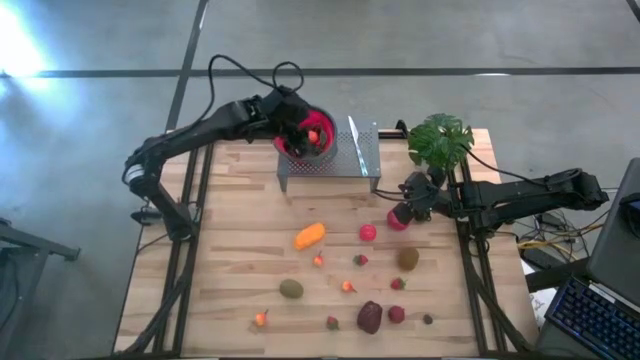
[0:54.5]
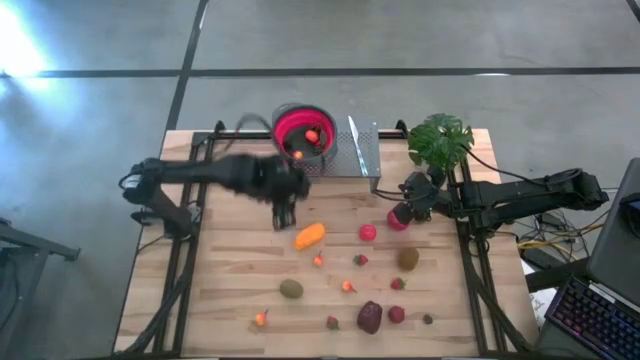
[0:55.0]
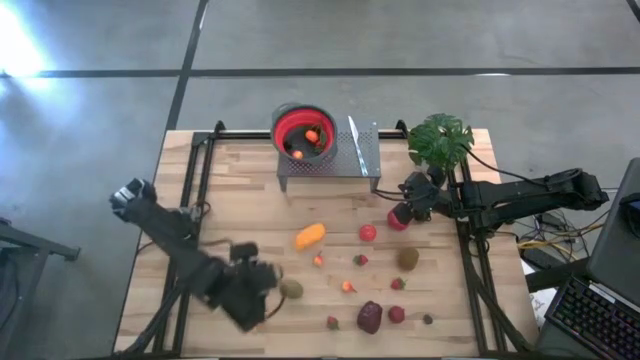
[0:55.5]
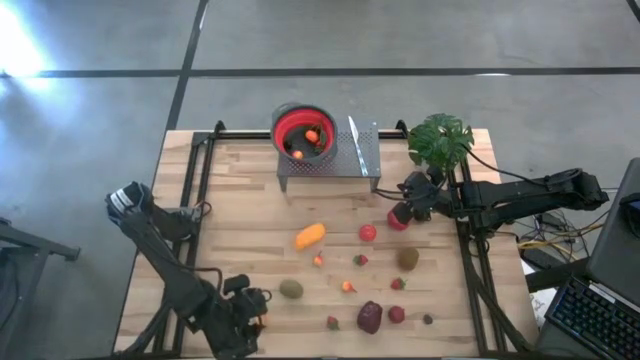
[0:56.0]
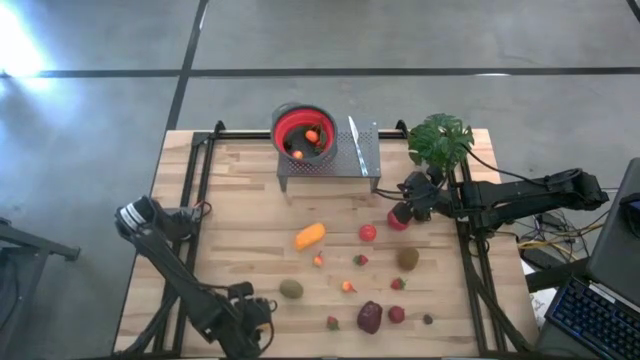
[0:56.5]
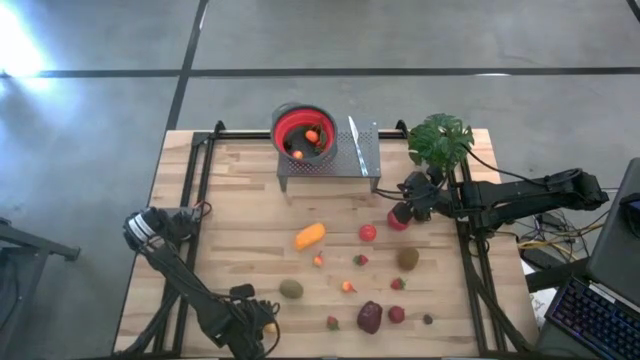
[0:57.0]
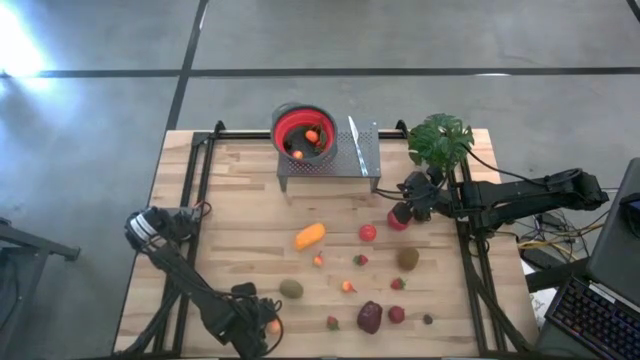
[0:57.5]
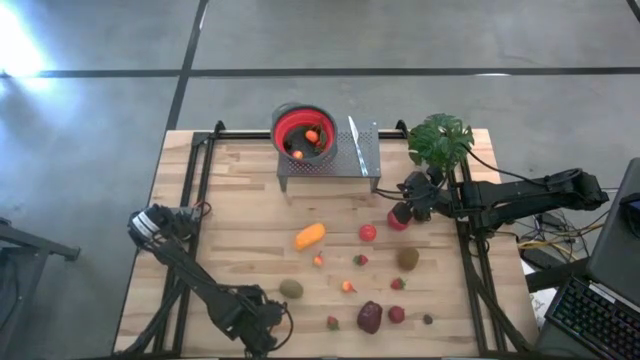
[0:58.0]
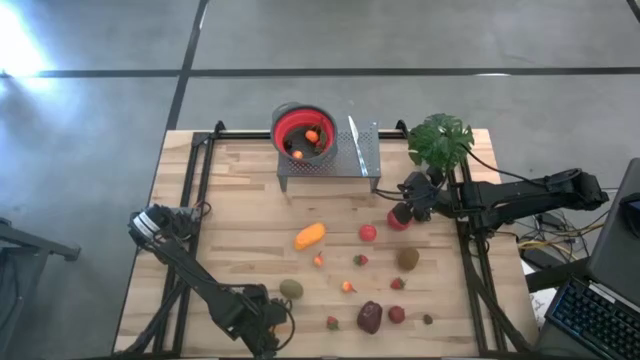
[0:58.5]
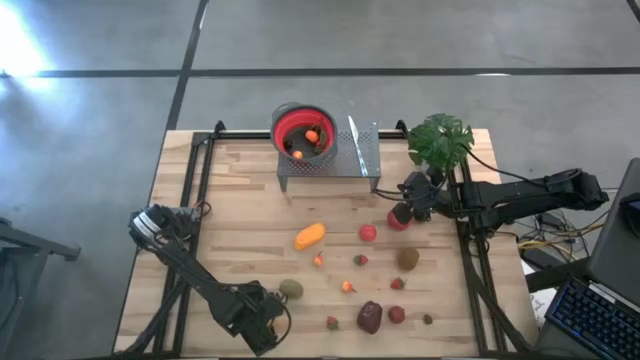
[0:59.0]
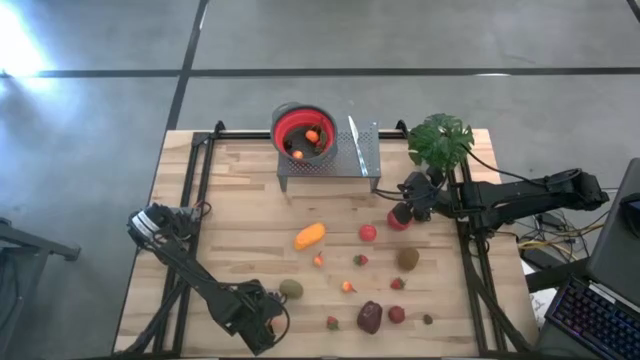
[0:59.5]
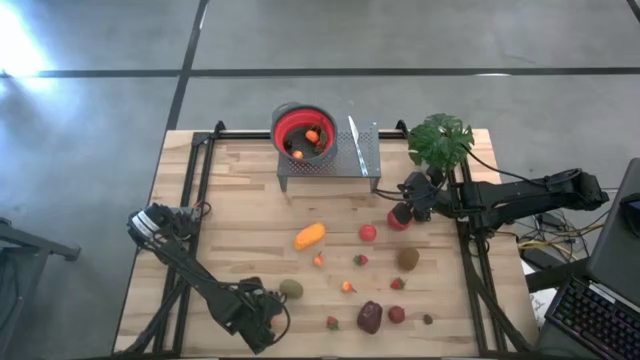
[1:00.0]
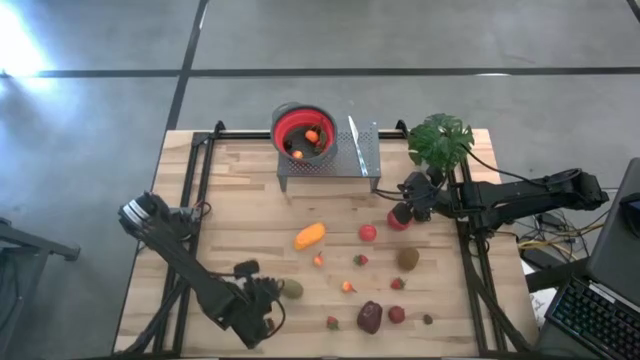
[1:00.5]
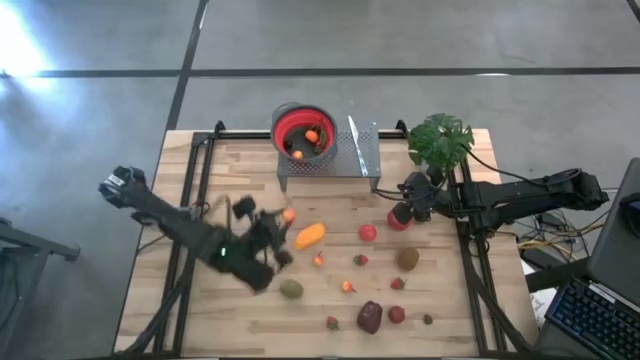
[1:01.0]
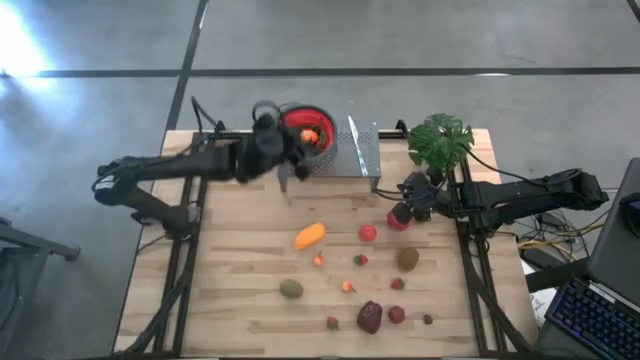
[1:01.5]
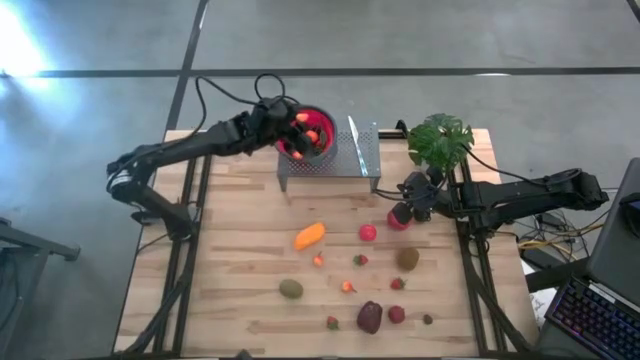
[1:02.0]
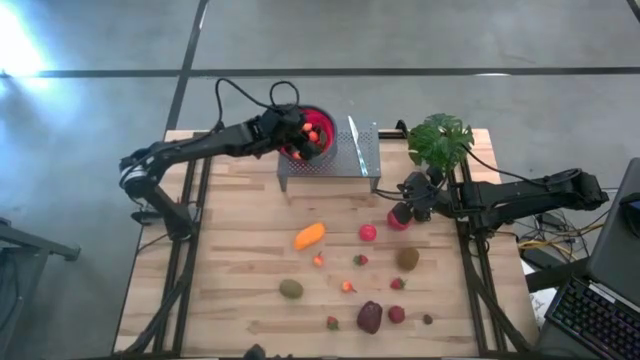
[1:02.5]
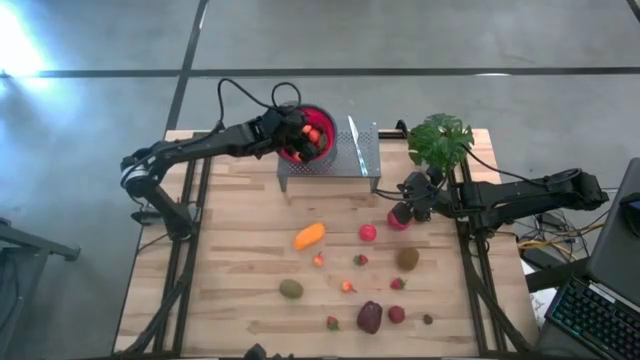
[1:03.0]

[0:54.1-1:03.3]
Task: Pick & Place Fruit
Put the bottom left yellow pear into the red strainer bowl on the shelf

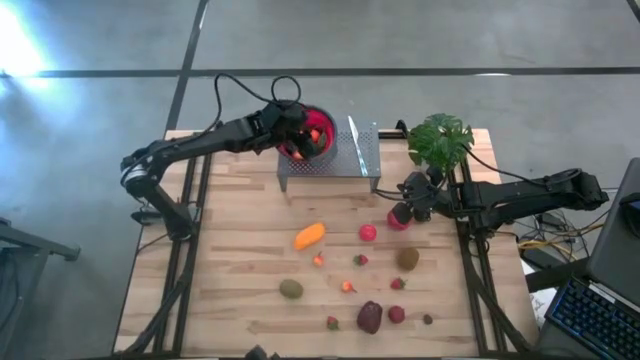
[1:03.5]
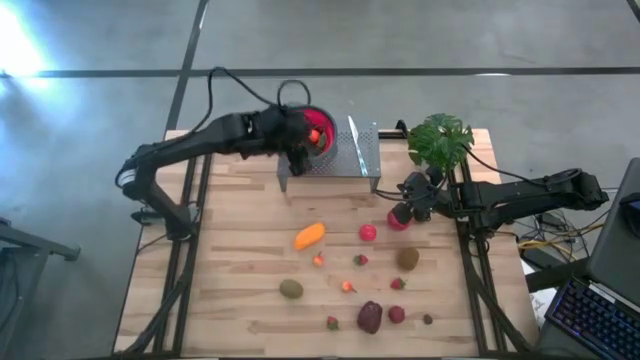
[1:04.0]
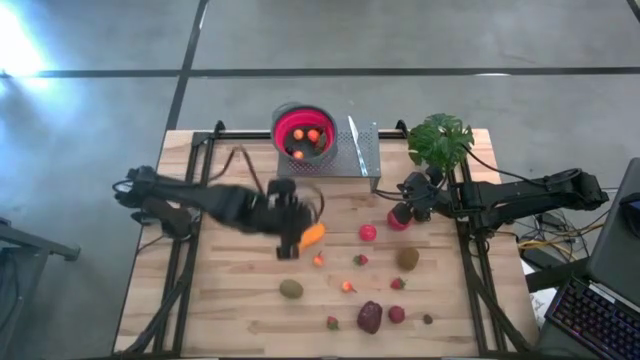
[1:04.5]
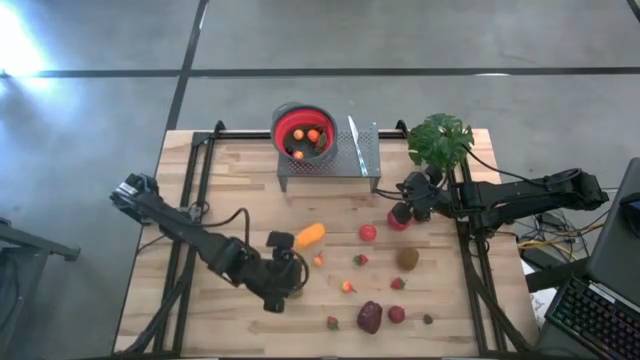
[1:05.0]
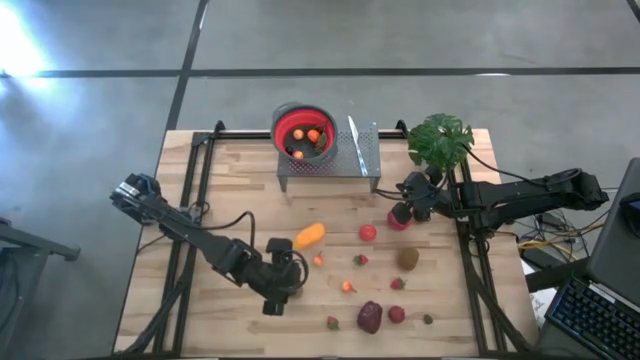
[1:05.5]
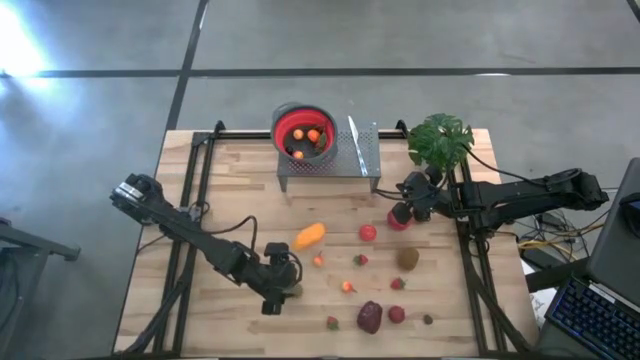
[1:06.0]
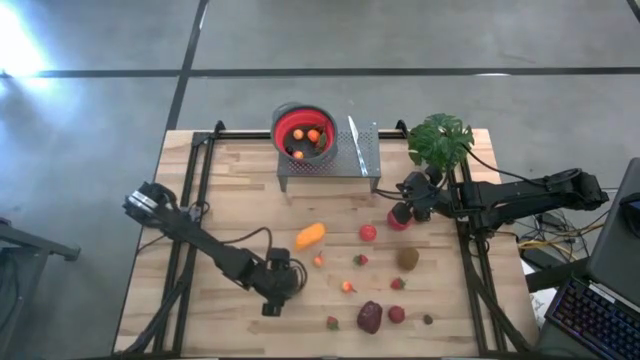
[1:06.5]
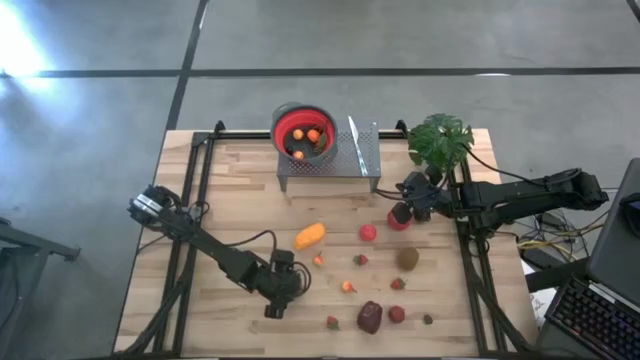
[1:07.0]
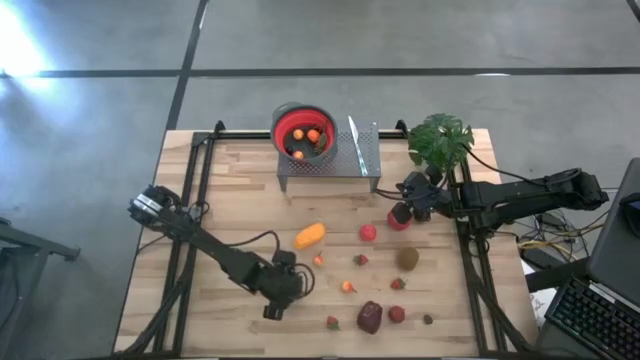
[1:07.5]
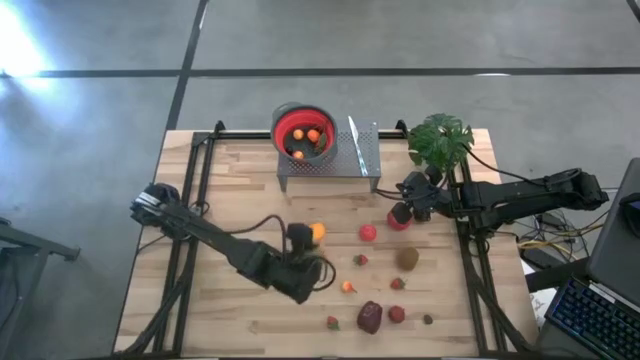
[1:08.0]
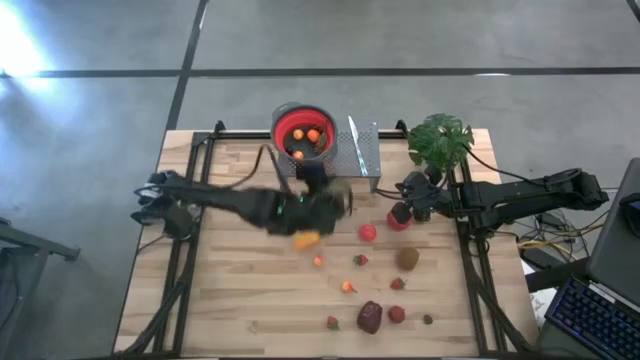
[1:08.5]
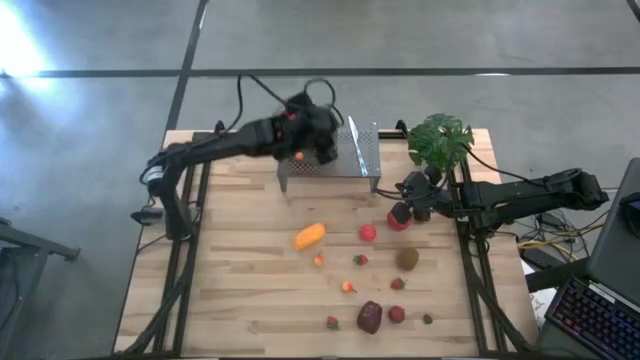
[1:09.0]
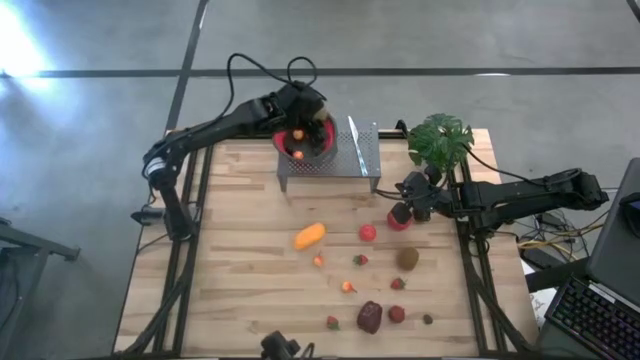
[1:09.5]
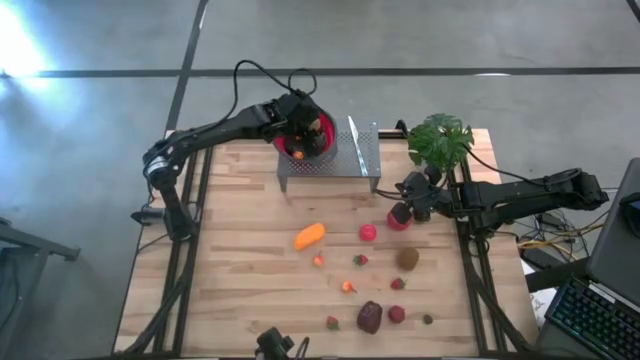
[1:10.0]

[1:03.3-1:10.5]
Put the left brown kiwi into the red strainer bowl on the shelf

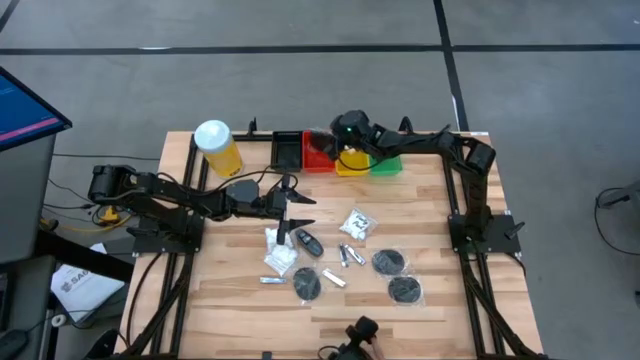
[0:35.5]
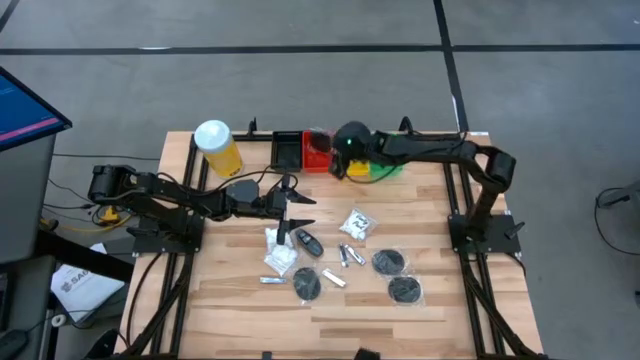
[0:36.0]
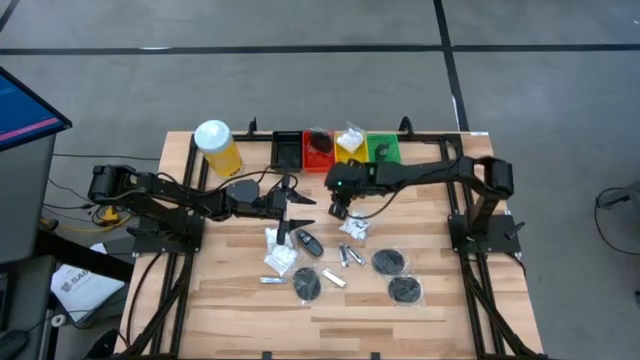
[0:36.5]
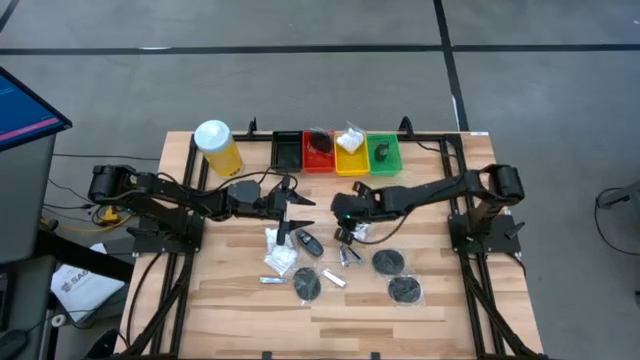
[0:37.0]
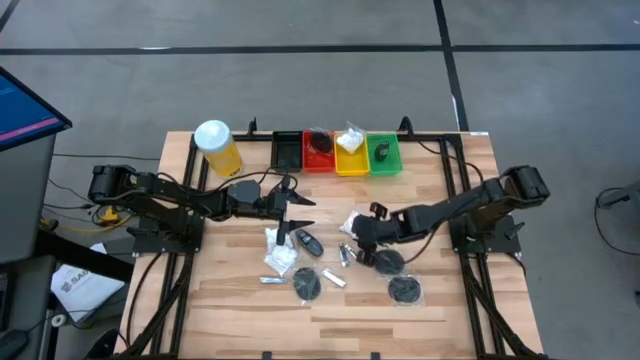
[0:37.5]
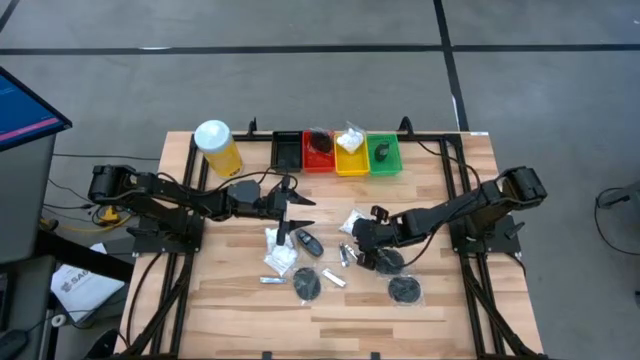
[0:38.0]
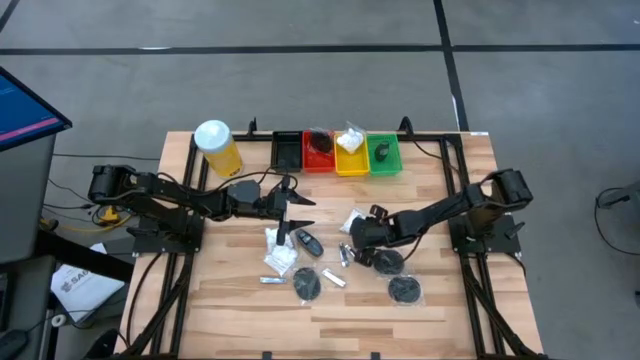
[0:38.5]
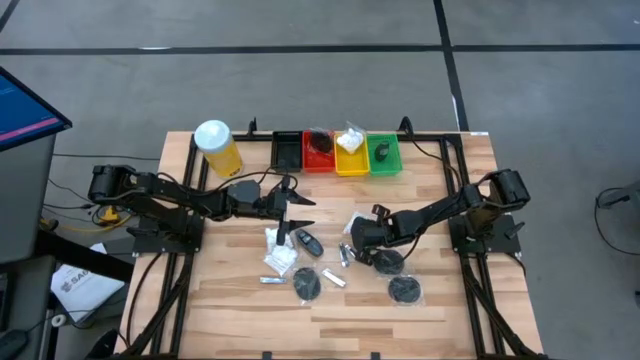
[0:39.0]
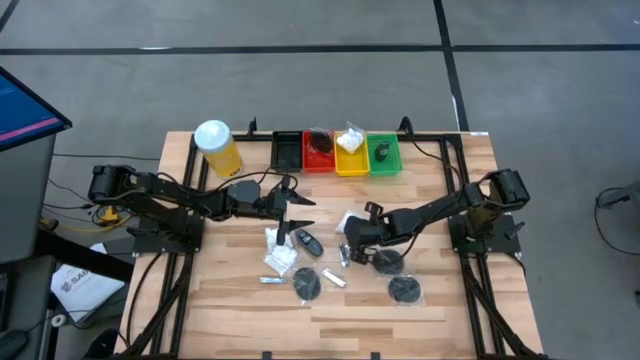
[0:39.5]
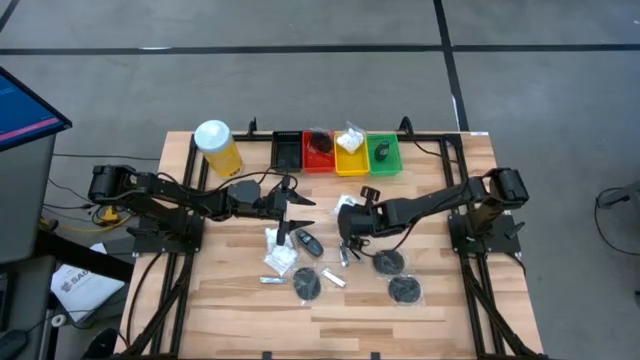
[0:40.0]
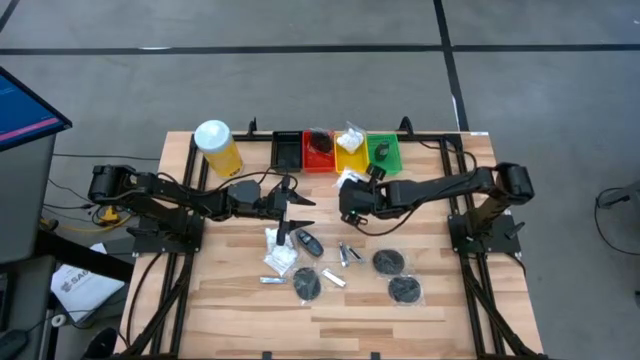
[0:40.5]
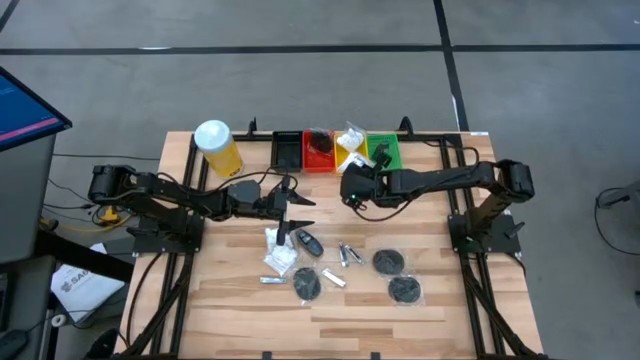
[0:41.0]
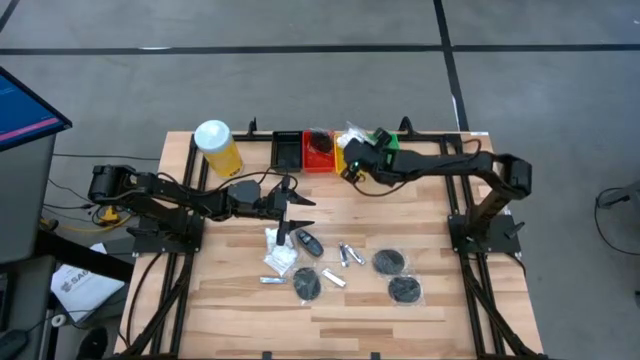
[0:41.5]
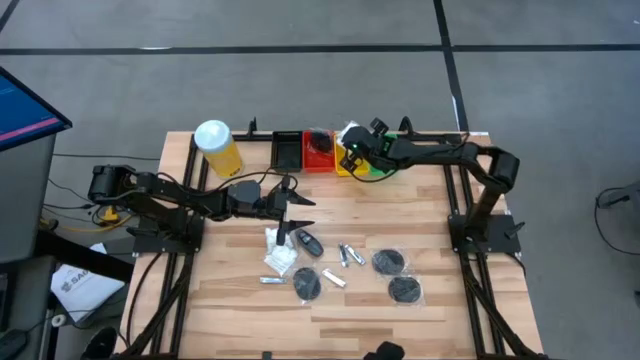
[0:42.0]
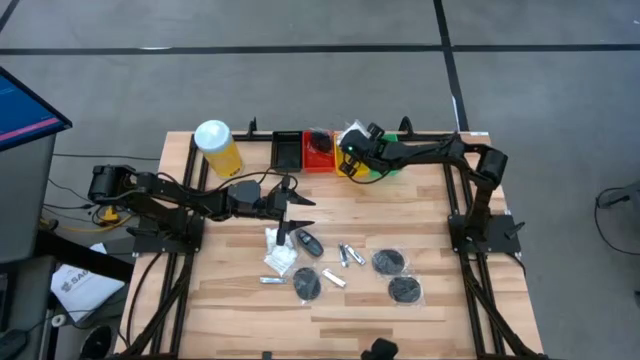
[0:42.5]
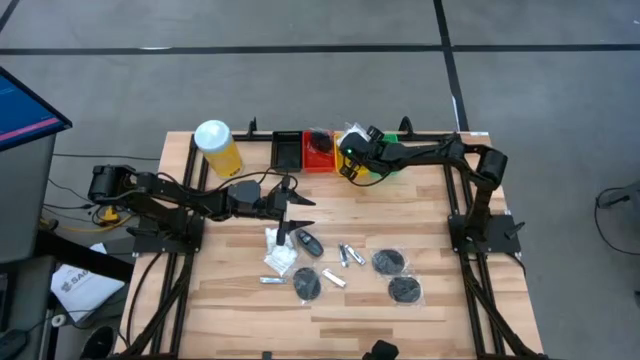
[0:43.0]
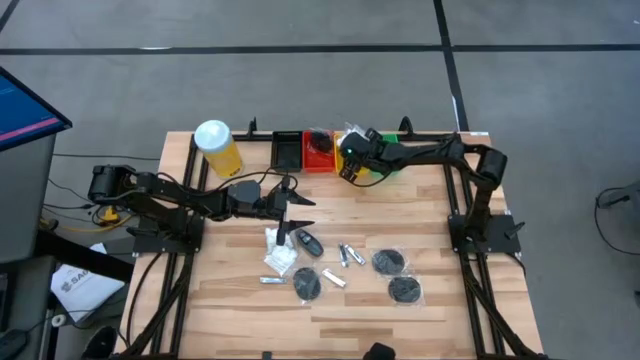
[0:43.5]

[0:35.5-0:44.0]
Task: Pick & Place Travel size toiletries
Put the cotton pack into the yellow bin
